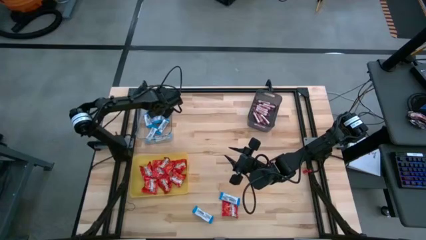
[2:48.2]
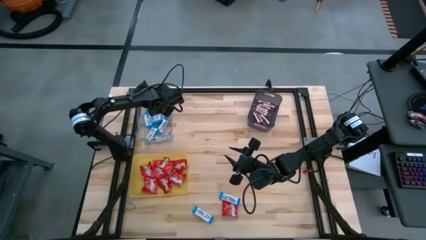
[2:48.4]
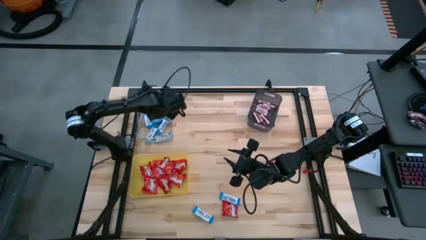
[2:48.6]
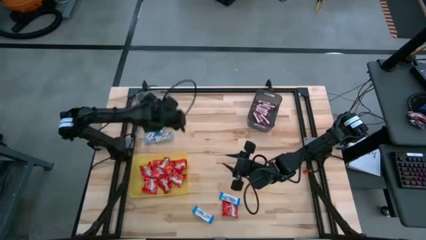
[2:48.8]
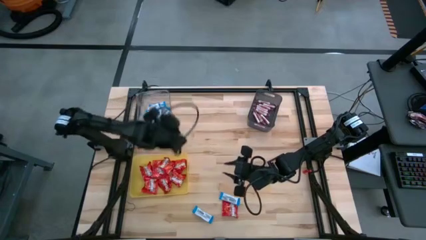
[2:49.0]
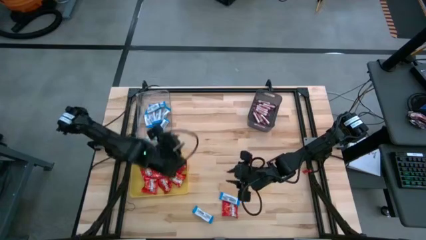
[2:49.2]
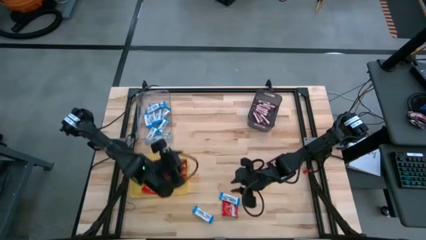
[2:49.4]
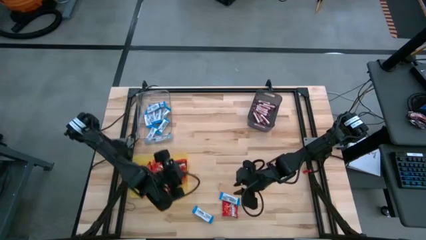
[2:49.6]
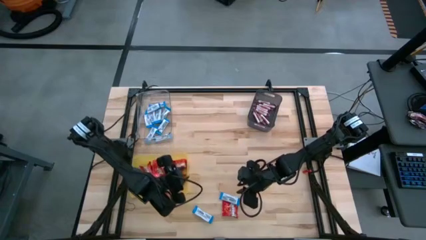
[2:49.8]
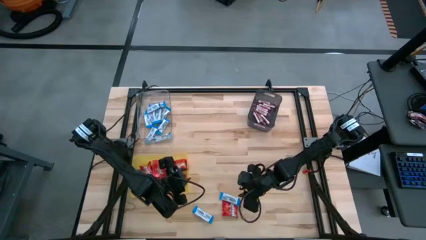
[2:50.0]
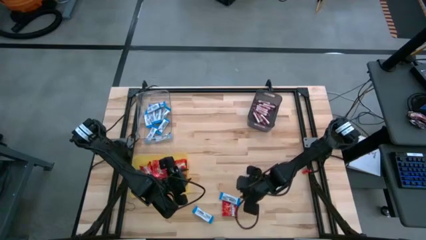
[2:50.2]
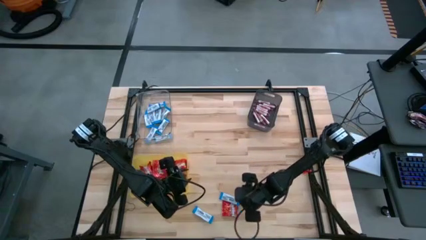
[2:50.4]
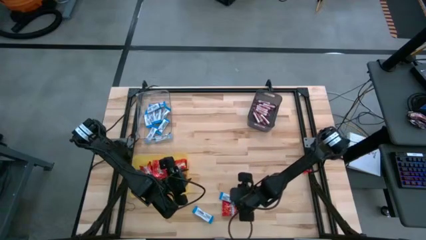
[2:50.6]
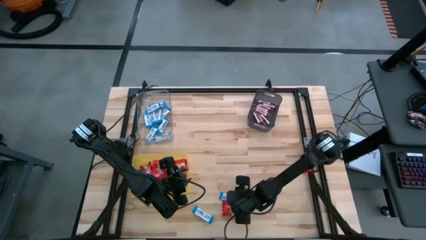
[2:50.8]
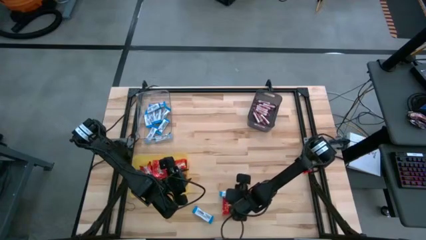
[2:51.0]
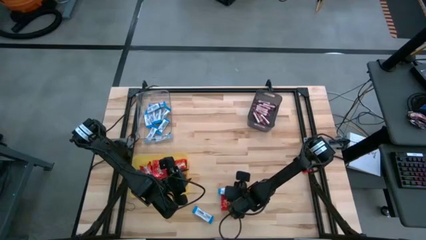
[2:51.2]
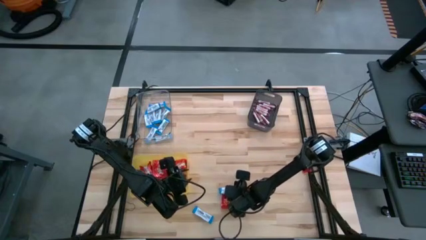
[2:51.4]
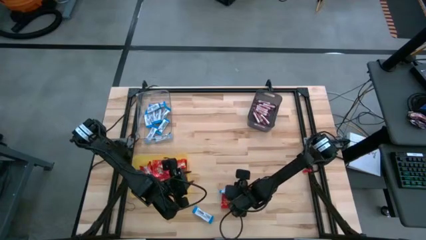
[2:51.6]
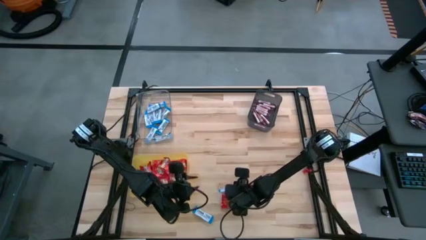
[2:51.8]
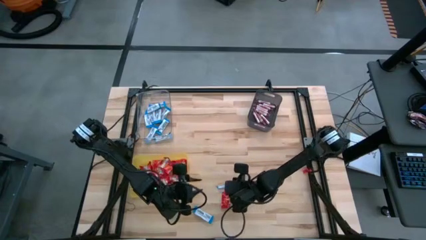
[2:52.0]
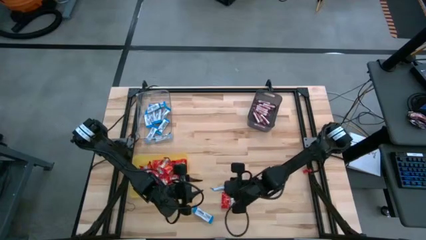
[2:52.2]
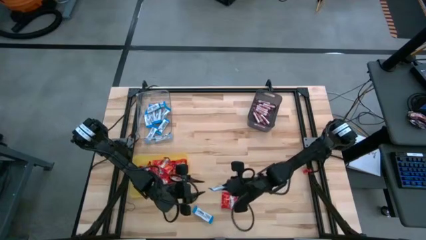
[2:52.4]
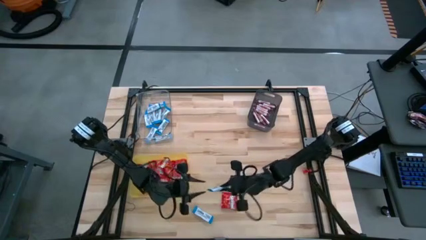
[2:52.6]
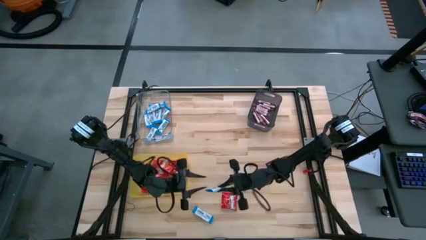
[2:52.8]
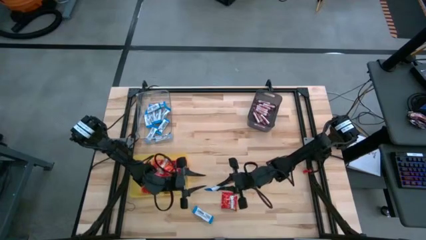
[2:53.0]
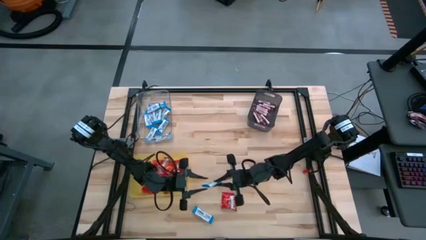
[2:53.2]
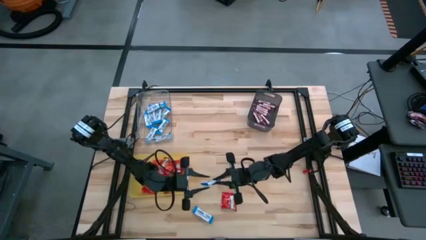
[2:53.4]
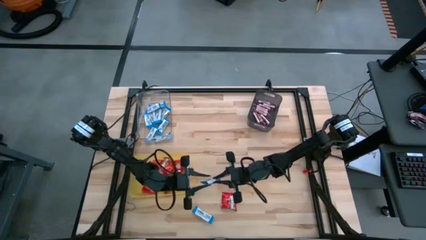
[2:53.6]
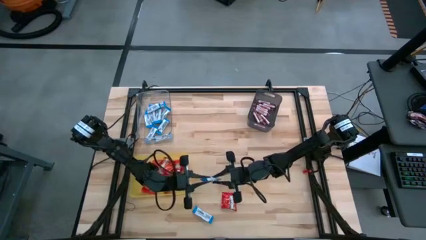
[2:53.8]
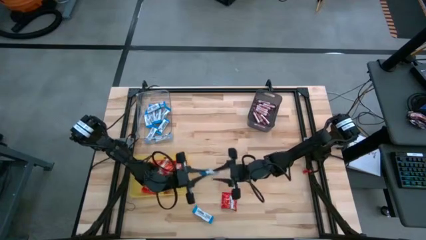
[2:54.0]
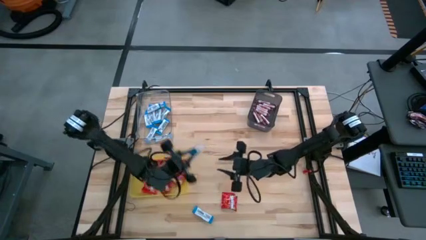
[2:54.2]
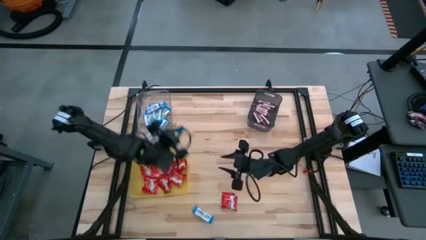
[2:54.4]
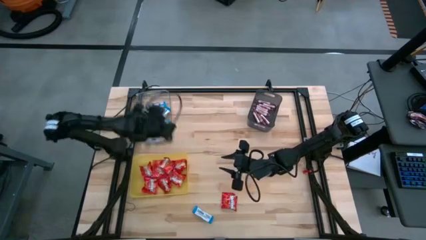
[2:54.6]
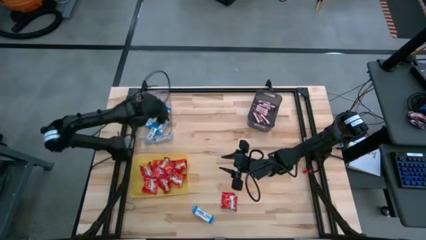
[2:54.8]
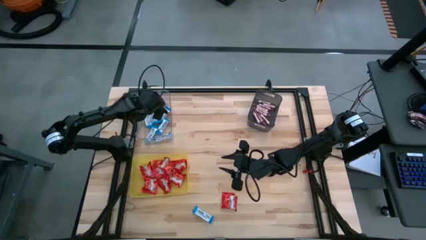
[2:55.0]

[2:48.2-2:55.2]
Task: Sort candy
Put the blue chocolate into the transparent bin

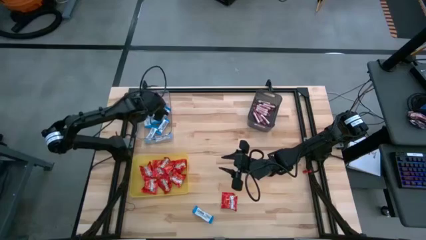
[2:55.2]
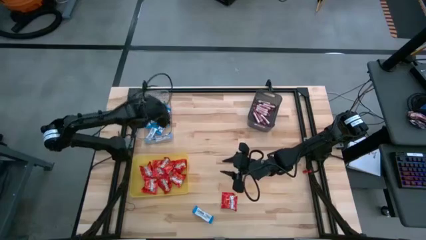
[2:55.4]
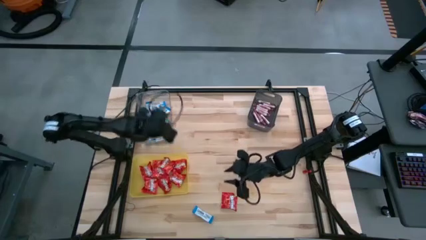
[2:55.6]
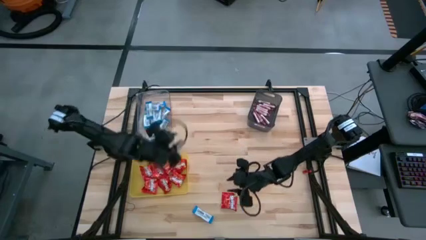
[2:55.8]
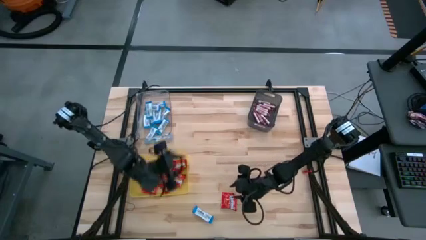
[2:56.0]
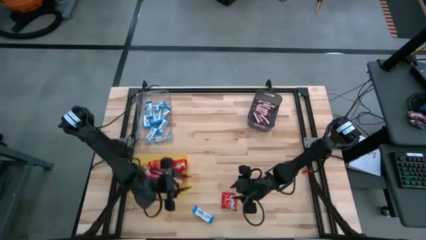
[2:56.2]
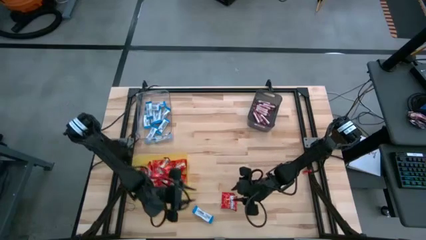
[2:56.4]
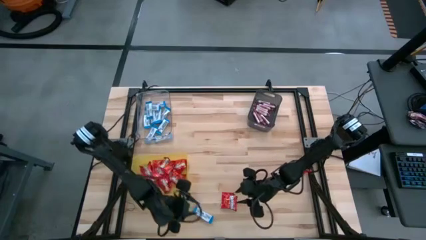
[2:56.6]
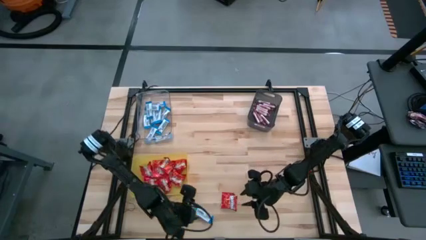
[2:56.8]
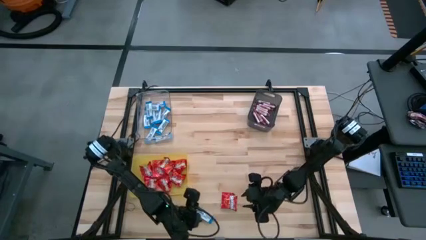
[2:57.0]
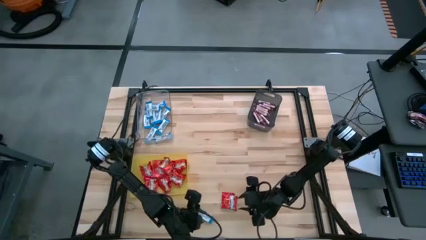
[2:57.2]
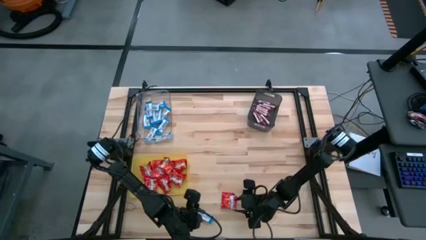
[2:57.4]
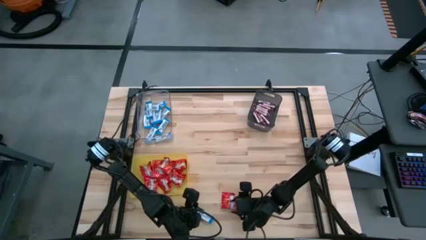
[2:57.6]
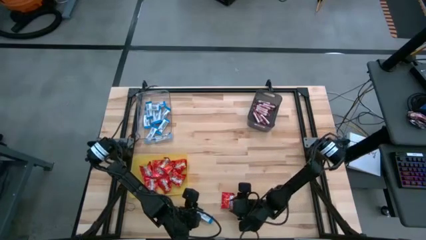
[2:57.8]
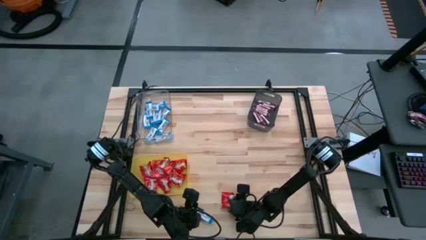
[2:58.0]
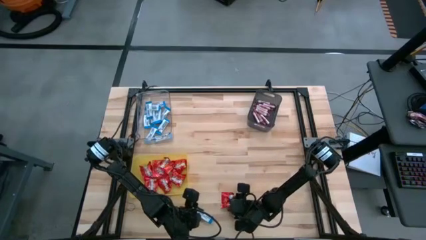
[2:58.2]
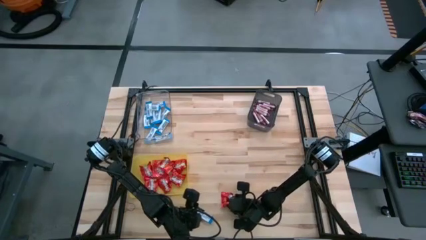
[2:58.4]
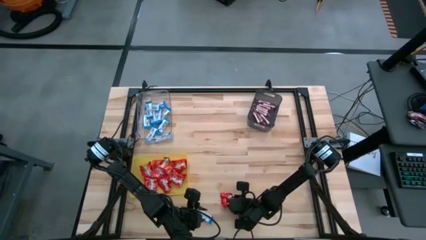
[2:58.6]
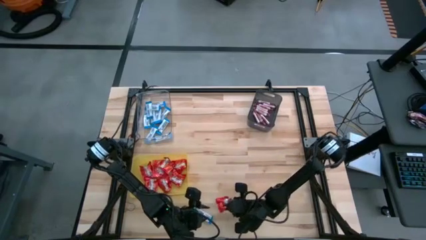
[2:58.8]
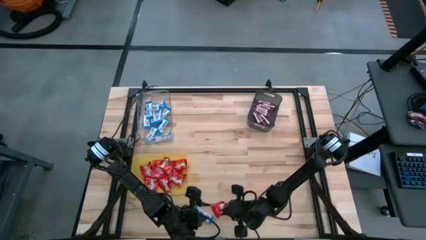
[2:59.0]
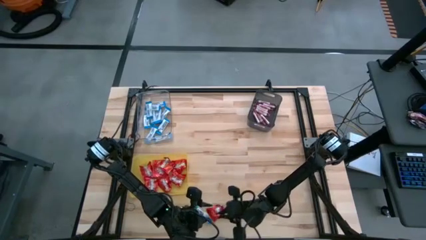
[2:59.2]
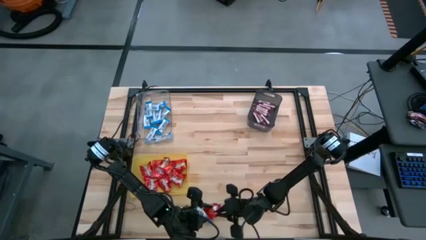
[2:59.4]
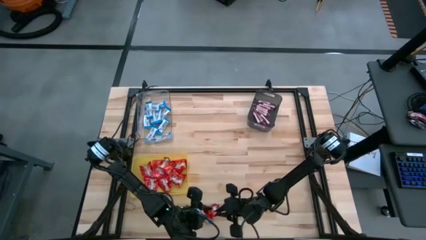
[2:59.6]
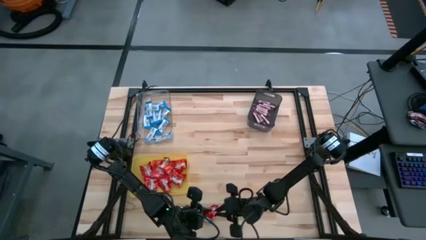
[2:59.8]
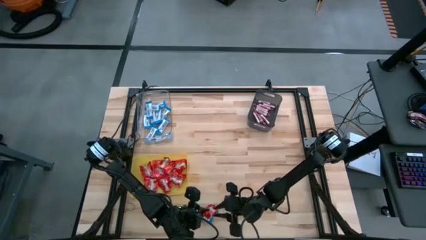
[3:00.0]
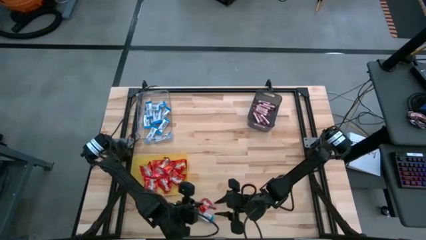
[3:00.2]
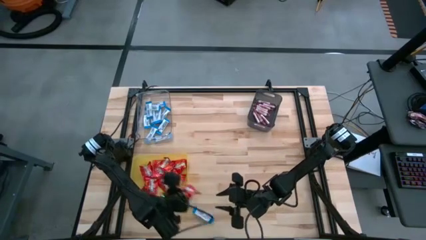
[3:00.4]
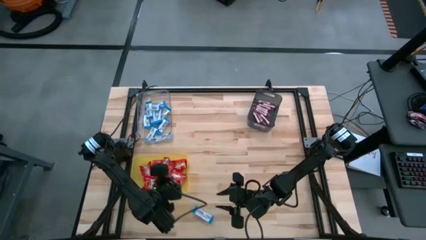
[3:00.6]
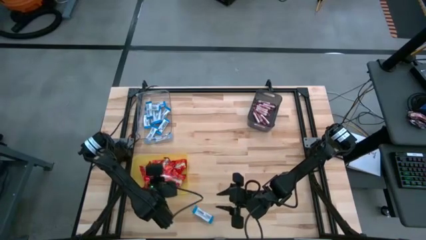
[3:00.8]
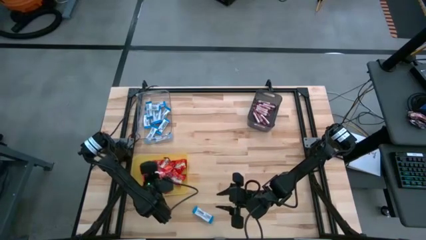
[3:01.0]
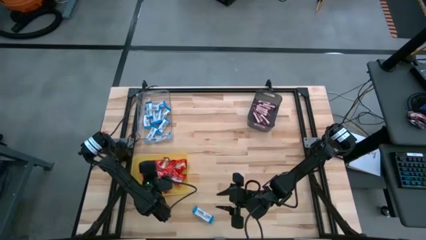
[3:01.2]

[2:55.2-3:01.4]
Put the red chocolate into the yellow bin

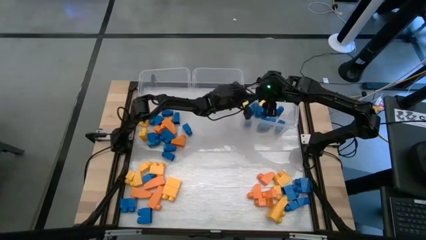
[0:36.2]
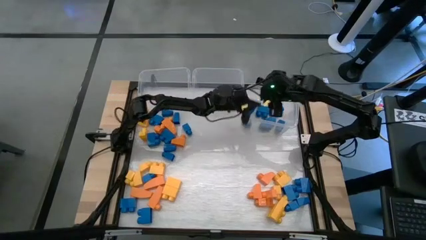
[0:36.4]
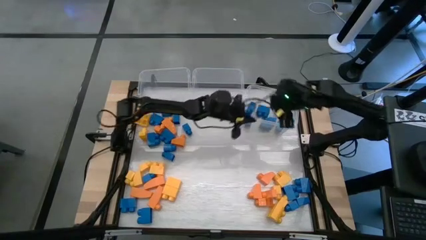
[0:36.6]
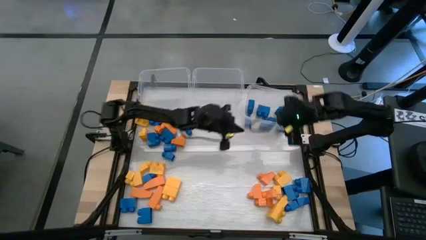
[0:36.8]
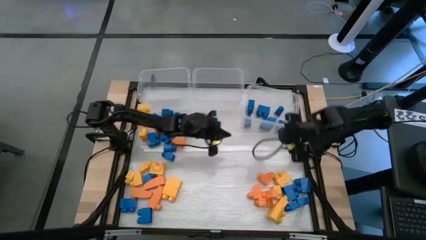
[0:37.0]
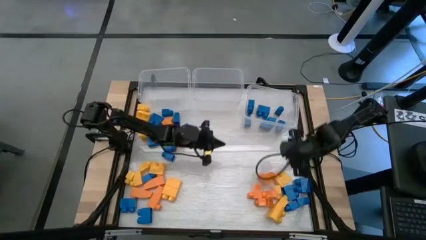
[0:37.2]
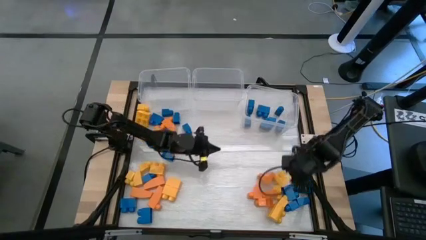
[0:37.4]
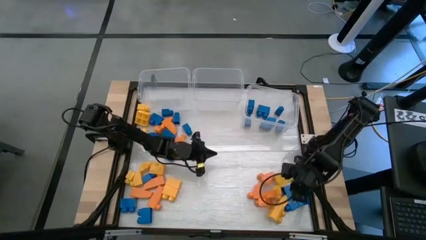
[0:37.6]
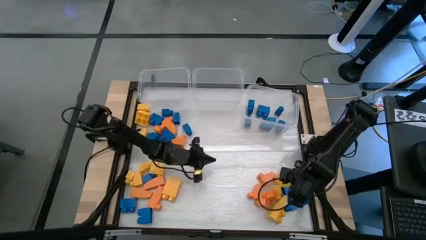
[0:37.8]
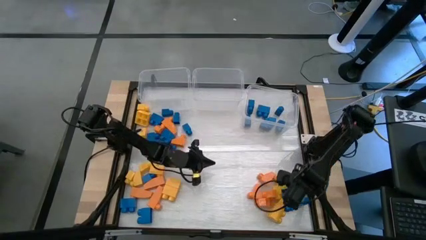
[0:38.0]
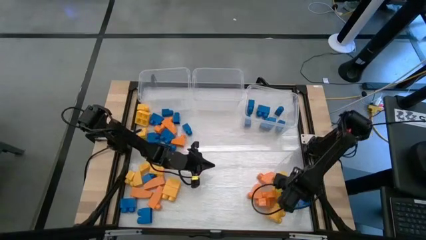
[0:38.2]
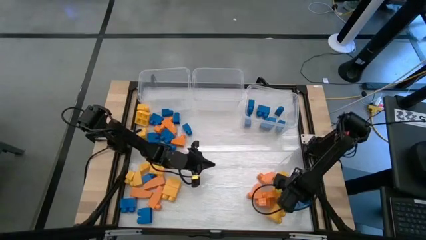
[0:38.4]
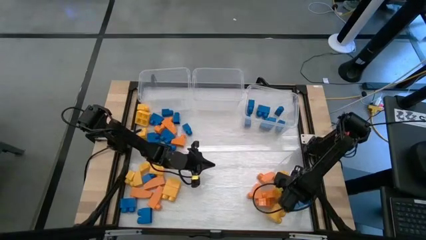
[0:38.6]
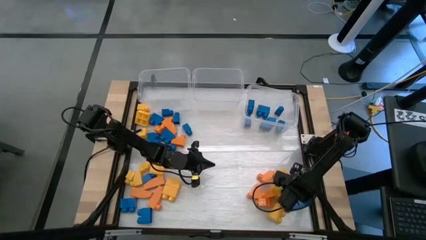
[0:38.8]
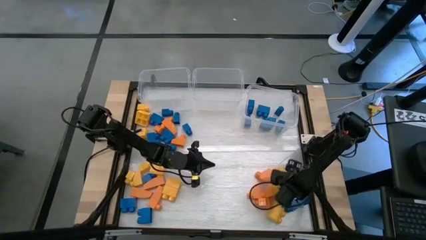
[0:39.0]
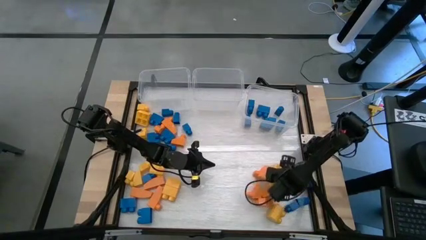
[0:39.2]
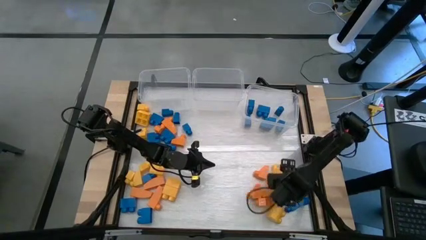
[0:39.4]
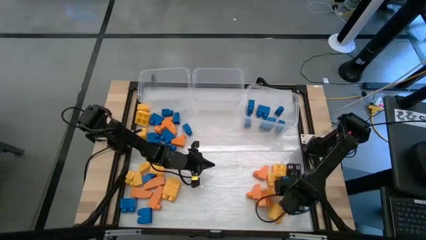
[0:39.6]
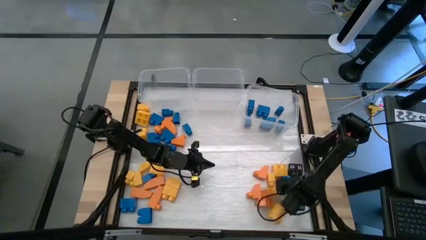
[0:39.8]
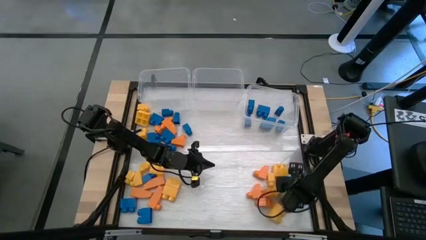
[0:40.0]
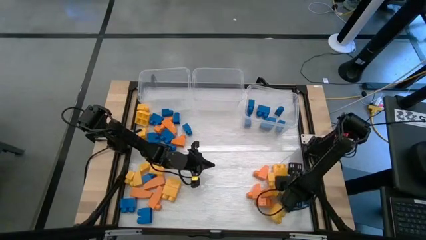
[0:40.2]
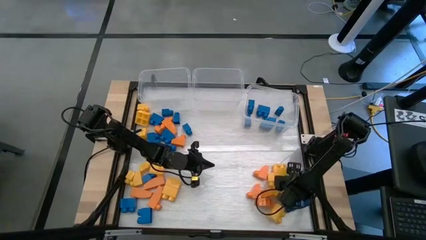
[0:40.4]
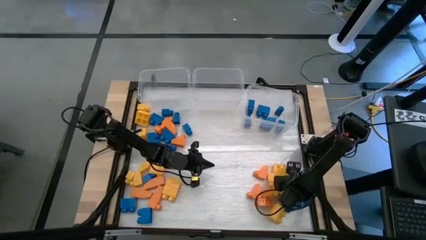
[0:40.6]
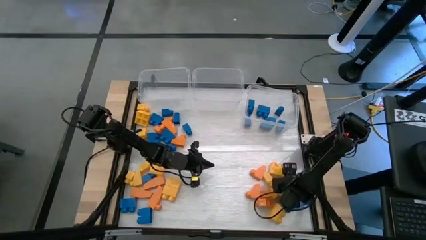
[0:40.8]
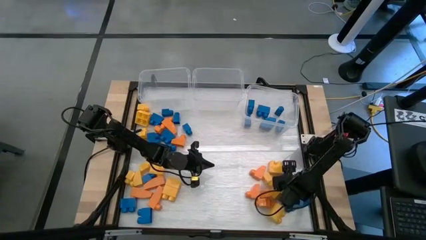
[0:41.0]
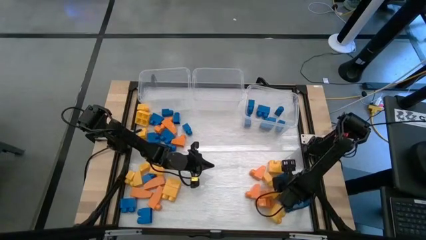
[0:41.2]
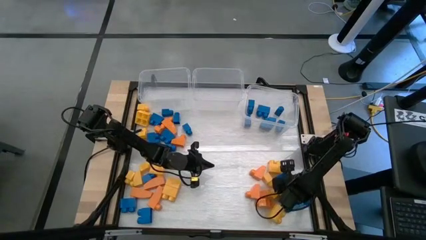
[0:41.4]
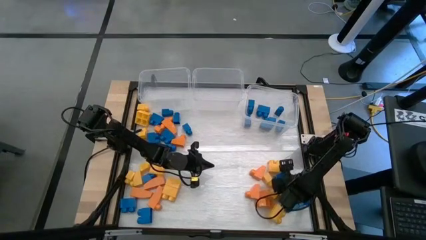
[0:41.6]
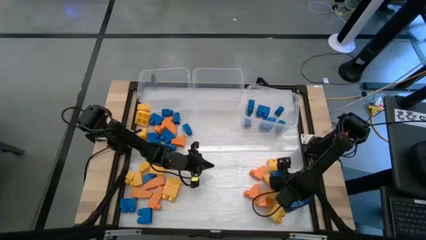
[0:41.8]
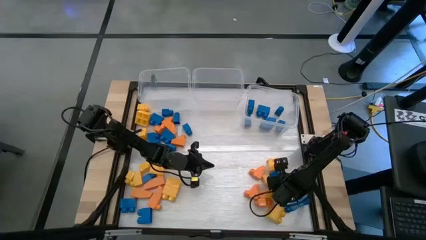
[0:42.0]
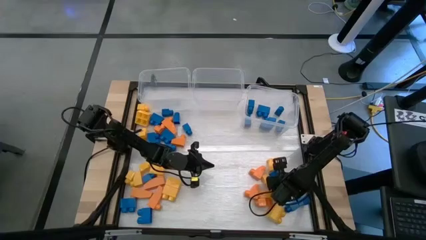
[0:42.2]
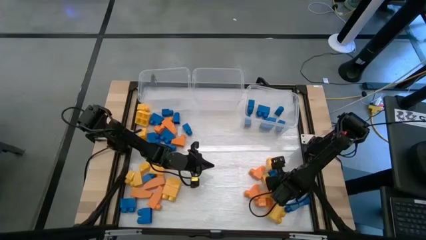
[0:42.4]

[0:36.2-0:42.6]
Task: Sort blocks
Put the blue game piece into the right transparent bin
